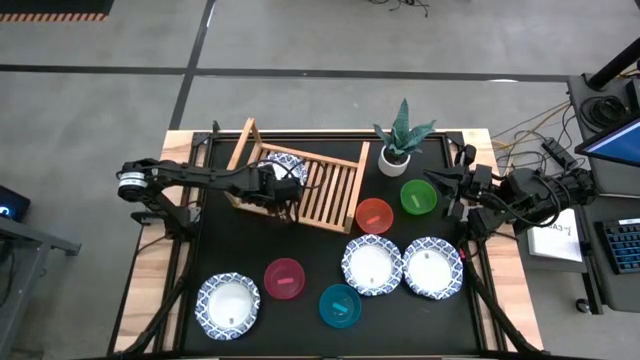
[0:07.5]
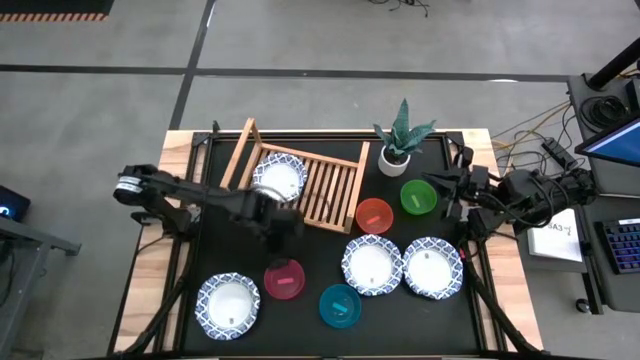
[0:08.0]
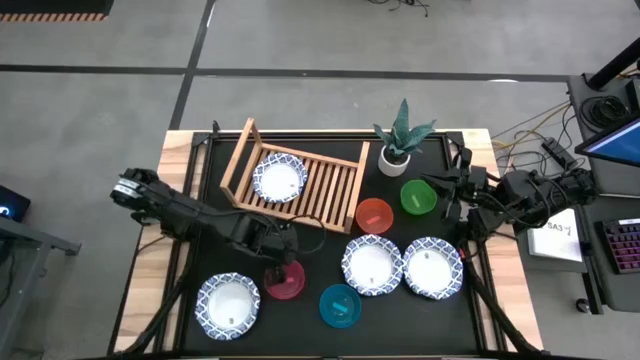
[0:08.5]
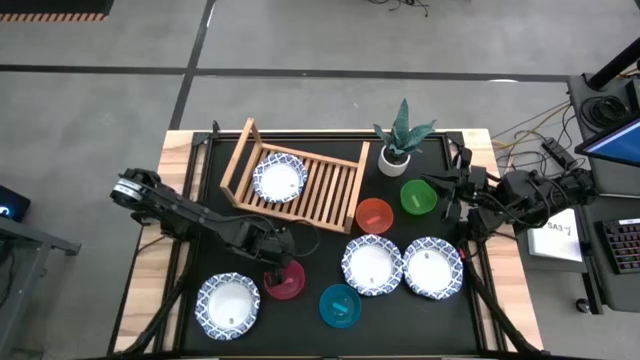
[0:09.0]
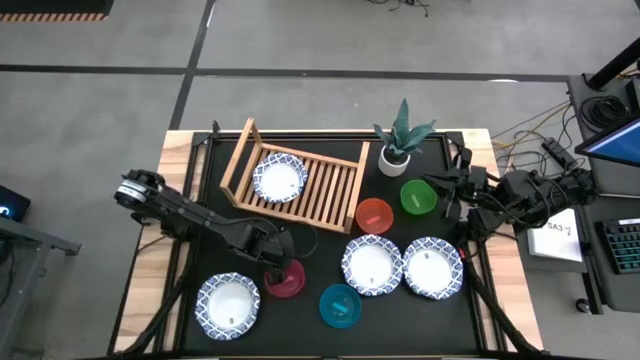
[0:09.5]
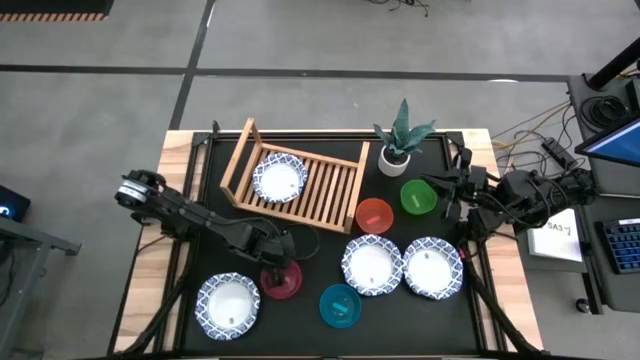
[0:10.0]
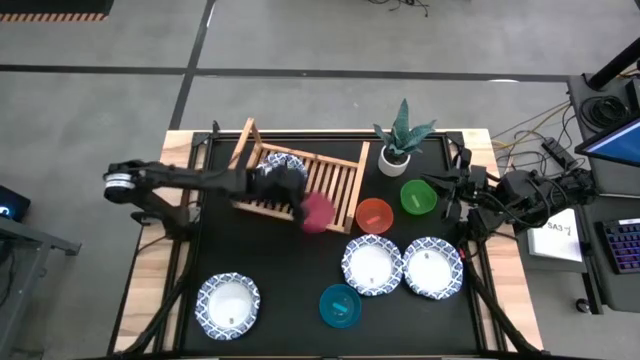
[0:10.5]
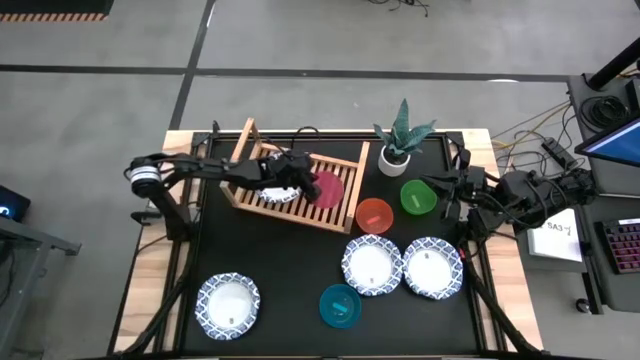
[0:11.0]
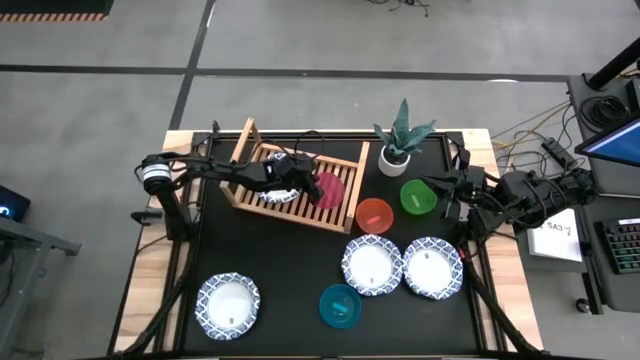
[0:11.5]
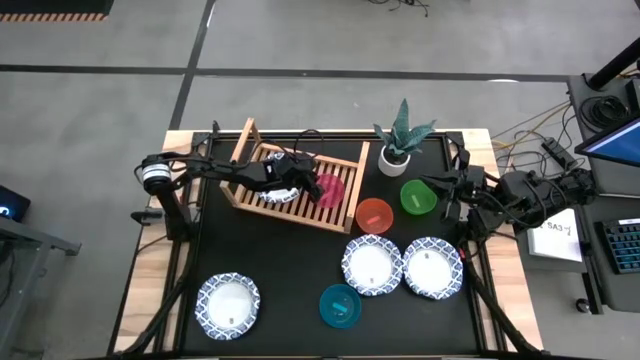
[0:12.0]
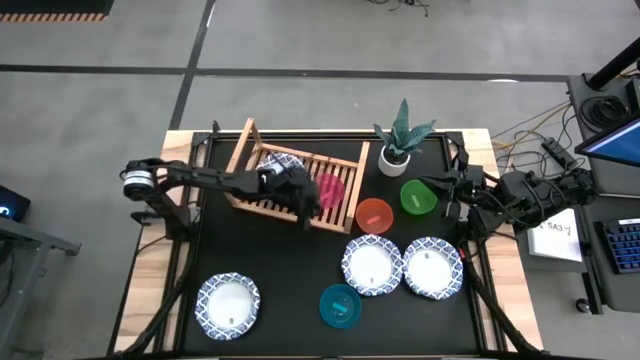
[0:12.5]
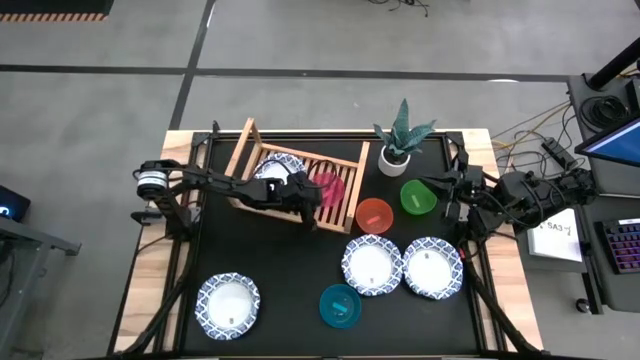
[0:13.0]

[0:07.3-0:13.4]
Task: Place and stack bowls onto a shelf
Put the red bowl on the shelf

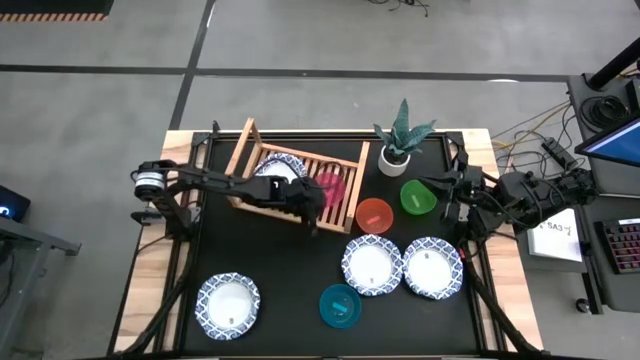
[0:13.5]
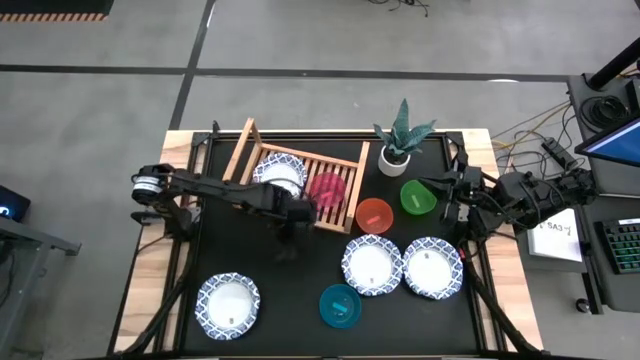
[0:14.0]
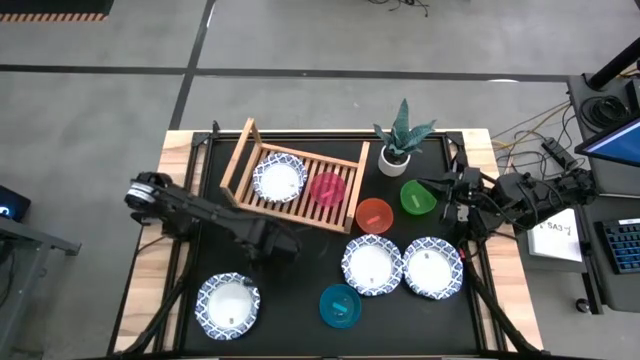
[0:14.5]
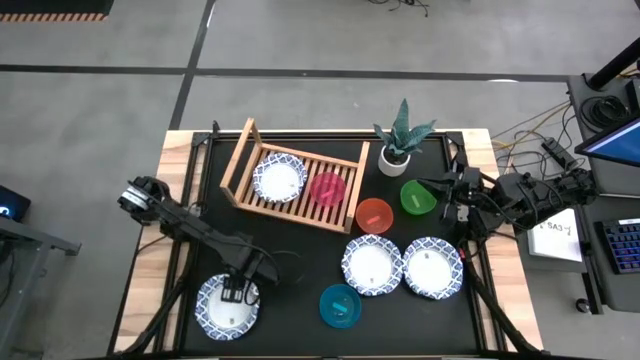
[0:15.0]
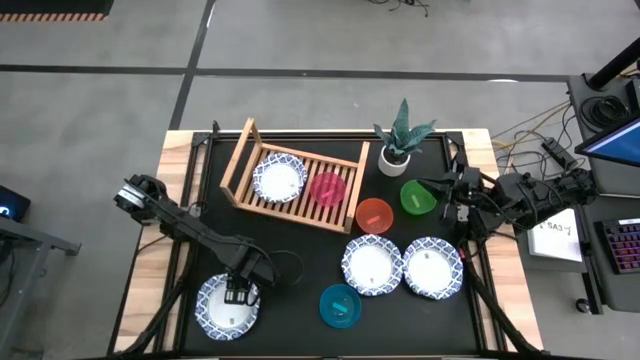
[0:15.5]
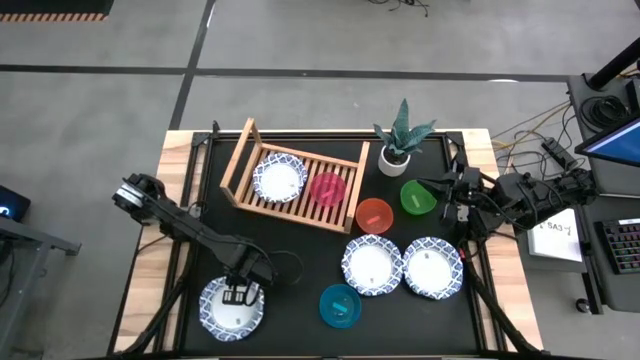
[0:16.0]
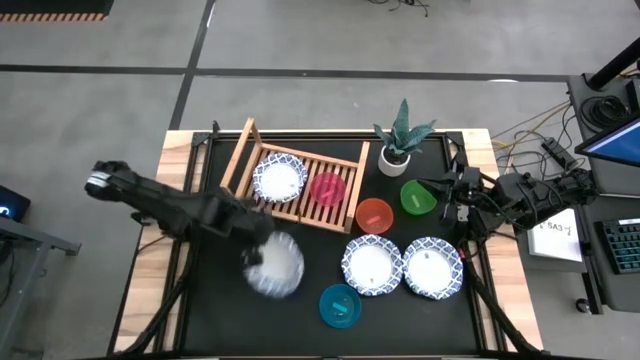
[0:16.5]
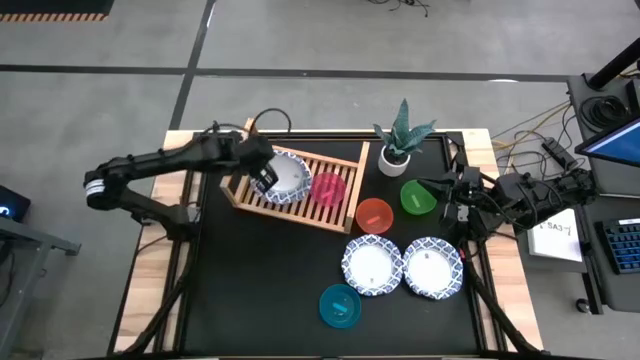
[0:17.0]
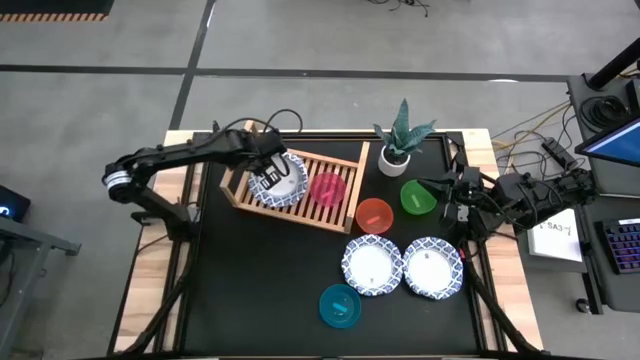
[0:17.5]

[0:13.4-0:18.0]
Stack the white patterned bowl on the white patterned bowl on the shelf

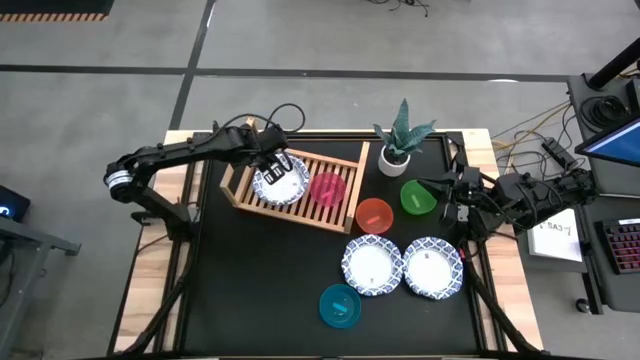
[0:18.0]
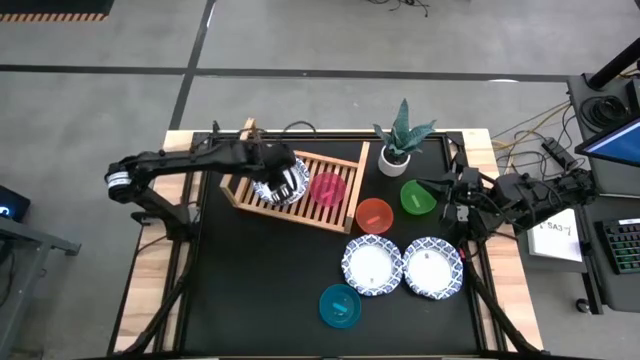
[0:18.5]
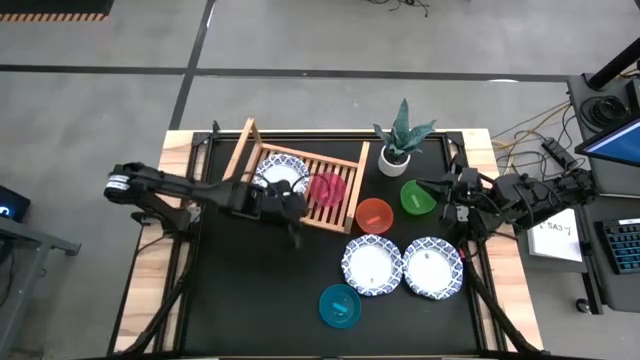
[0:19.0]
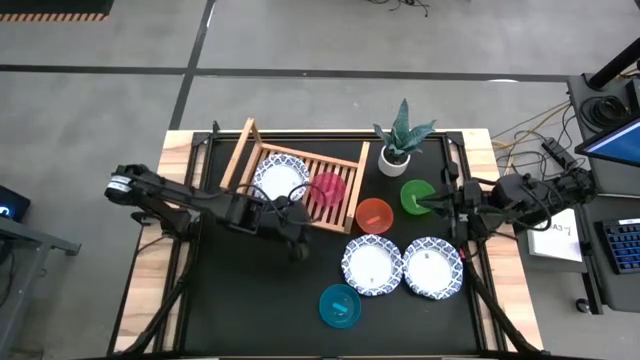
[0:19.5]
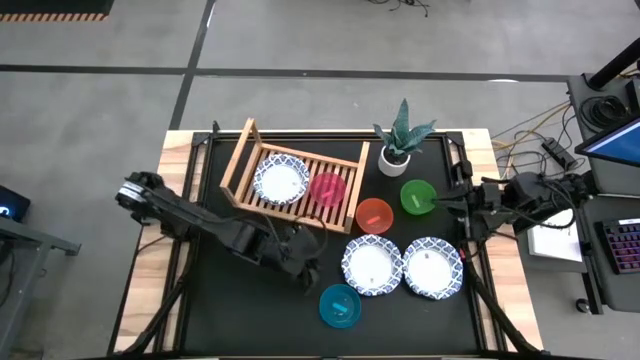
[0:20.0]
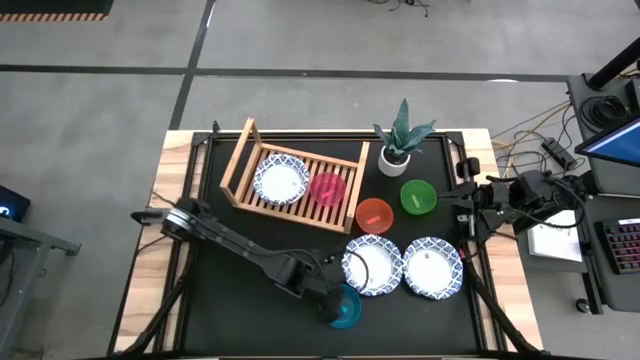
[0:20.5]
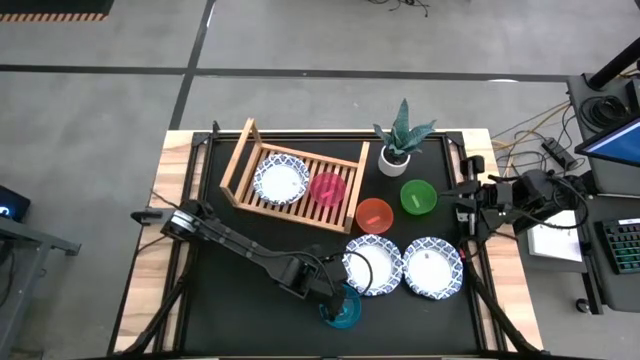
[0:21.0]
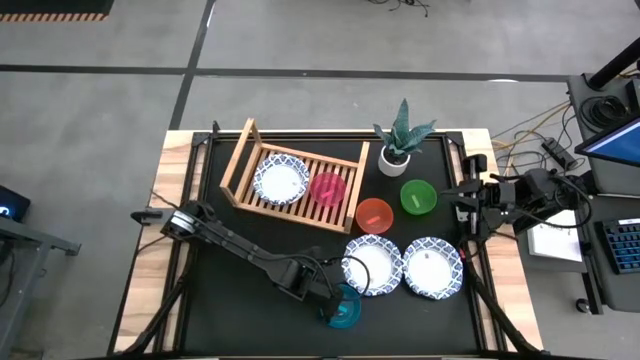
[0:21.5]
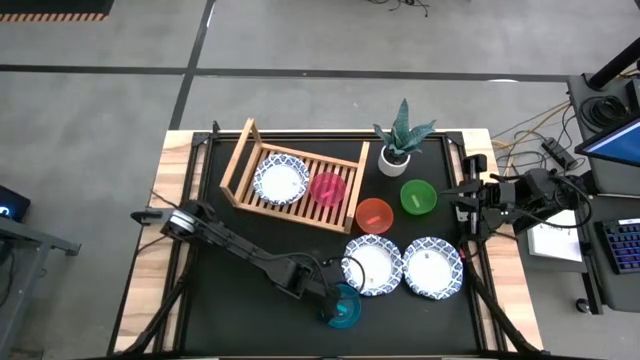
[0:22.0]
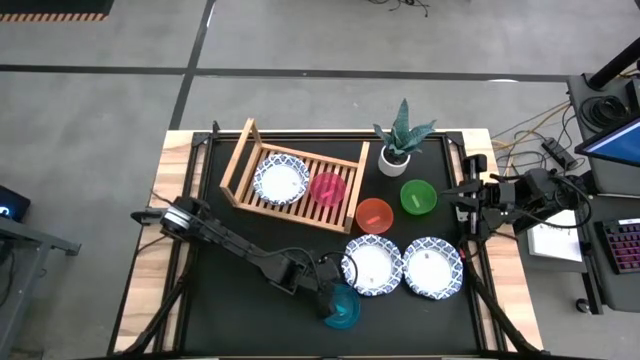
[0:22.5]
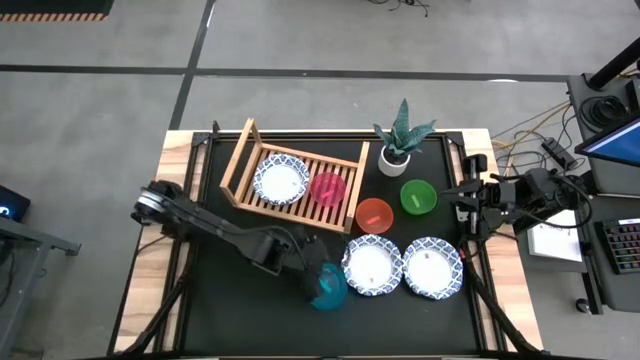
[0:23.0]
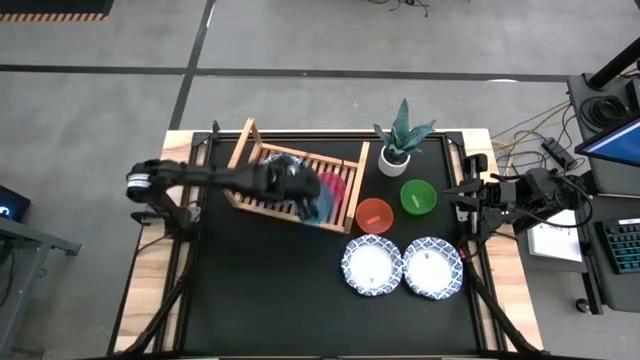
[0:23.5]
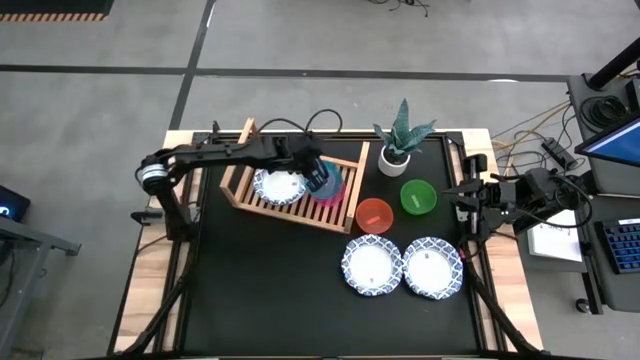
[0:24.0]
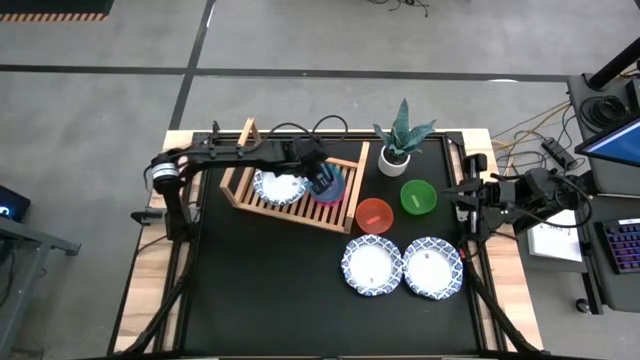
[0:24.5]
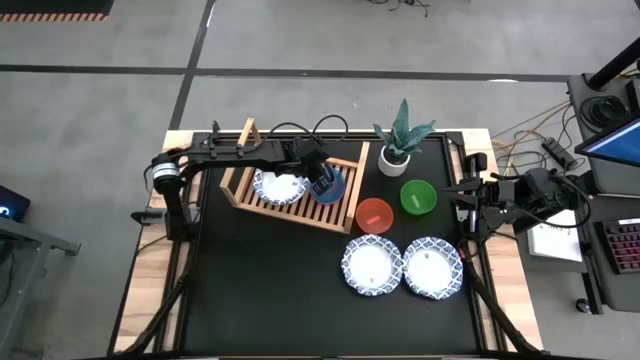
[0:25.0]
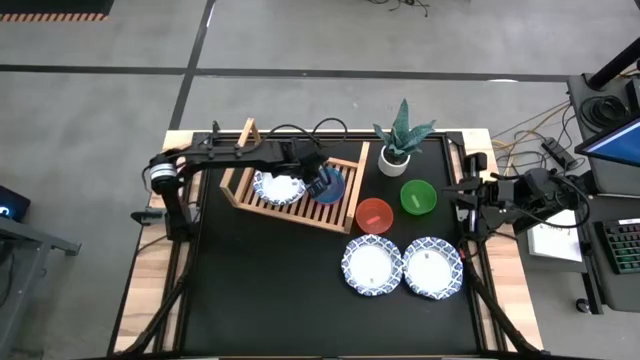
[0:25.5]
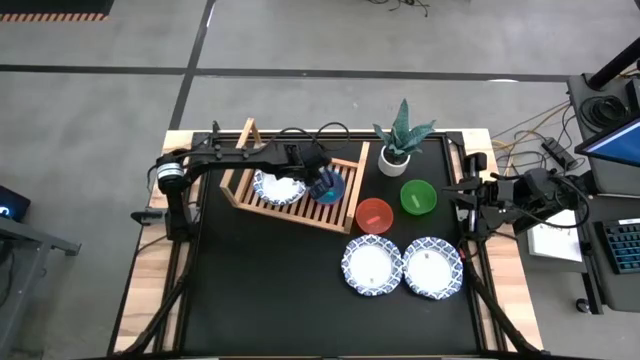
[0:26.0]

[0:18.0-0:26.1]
Stack the blue bowl on the red bowl on the shelf

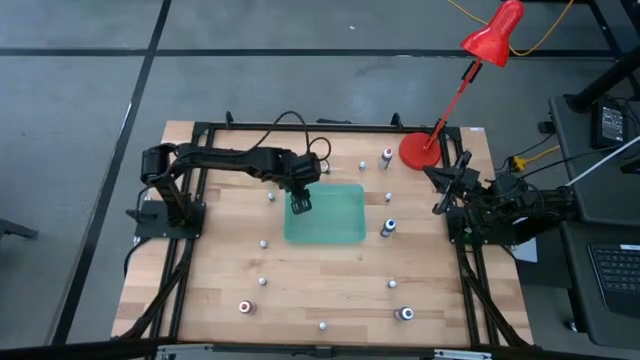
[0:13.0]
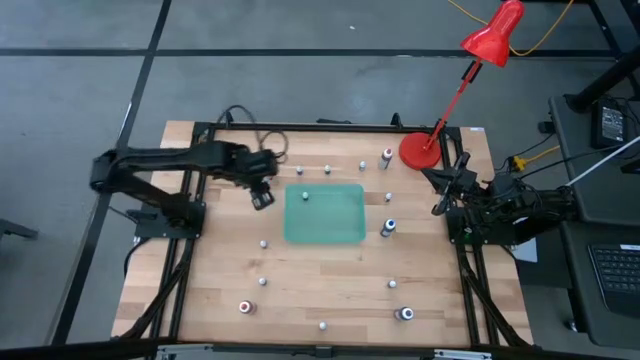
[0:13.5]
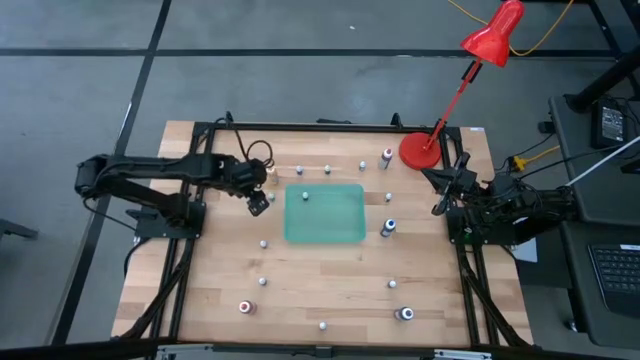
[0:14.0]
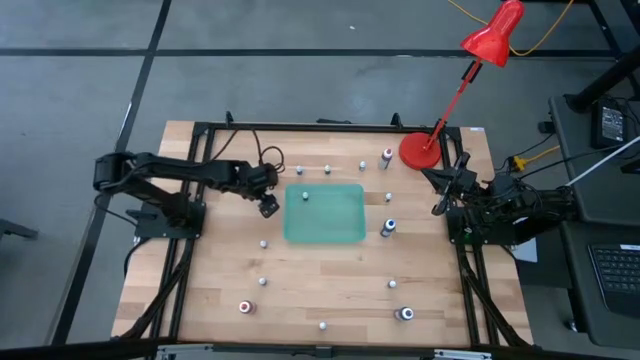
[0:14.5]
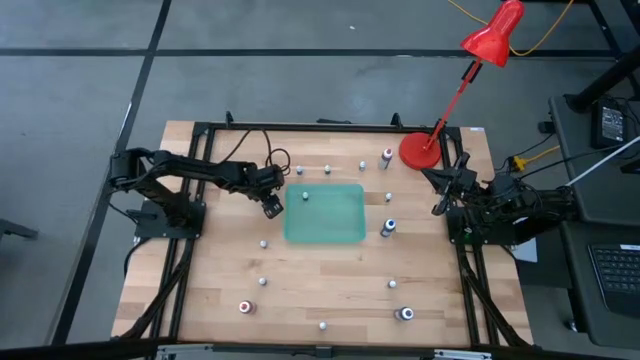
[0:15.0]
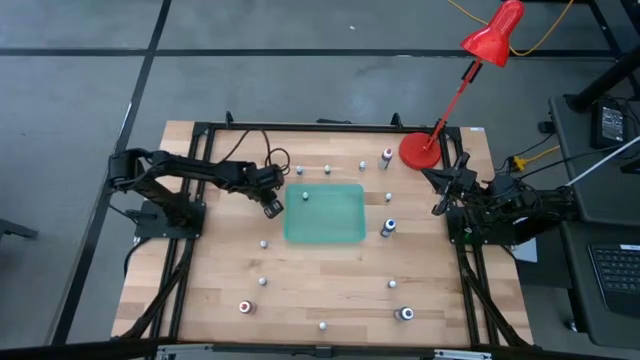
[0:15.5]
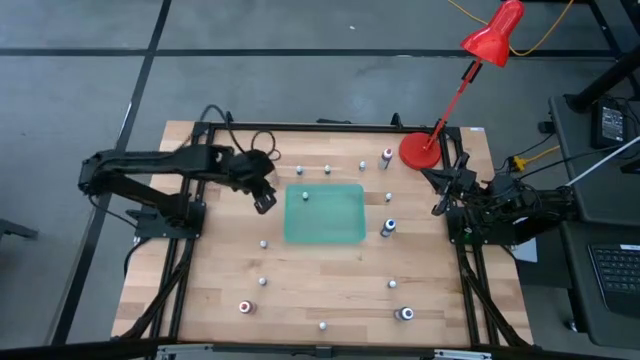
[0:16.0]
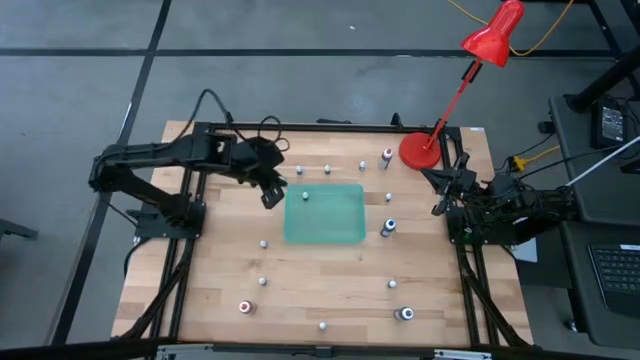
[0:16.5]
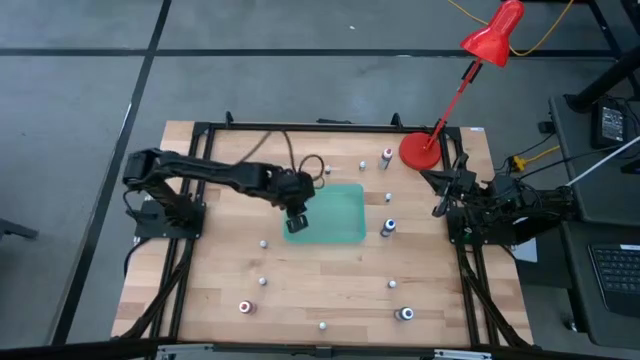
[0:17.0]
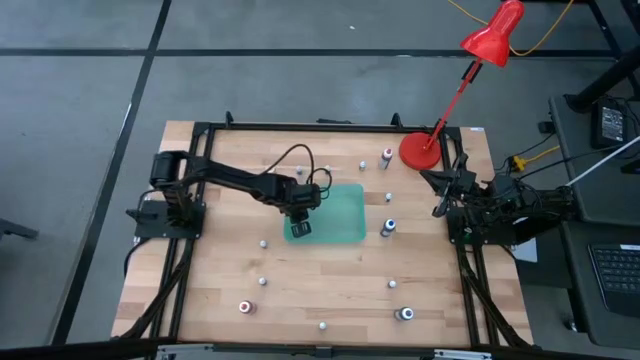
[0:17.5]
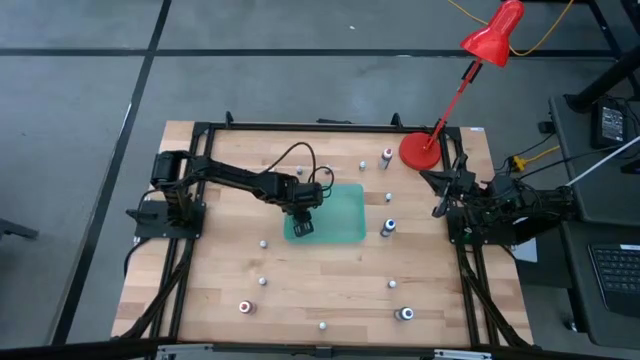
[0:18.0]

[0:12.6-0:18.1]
Task: Pick & Place food coloring
Put the small blue food coloring bottle into the green bin
